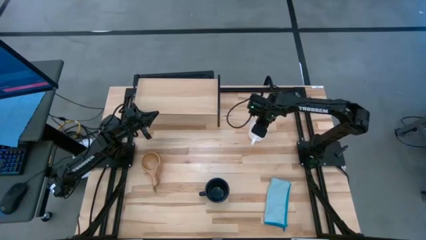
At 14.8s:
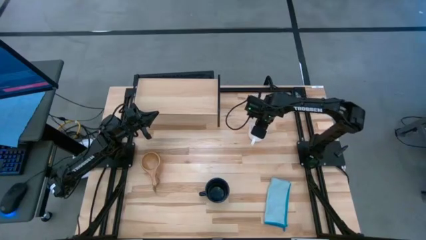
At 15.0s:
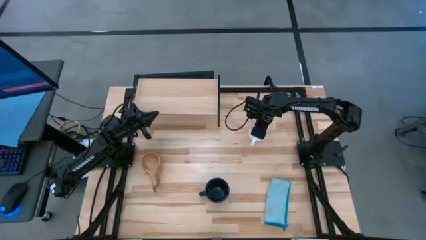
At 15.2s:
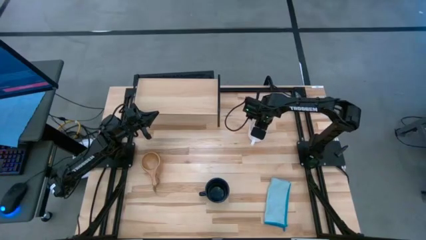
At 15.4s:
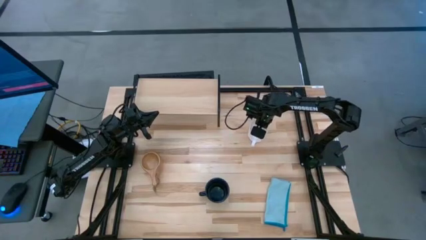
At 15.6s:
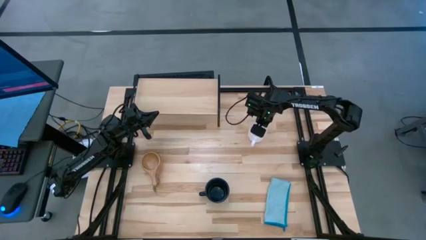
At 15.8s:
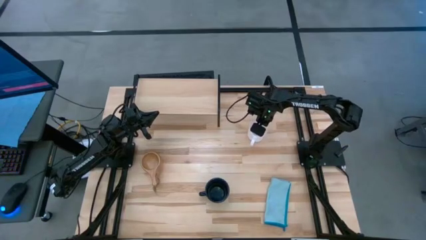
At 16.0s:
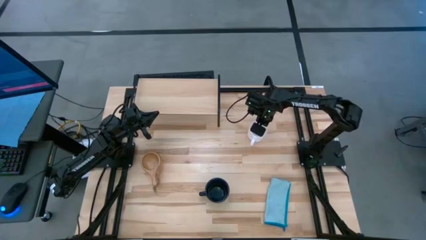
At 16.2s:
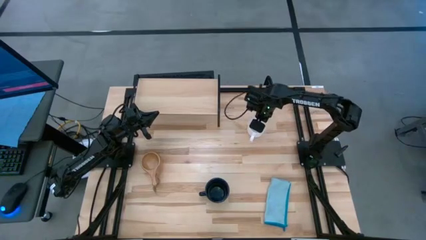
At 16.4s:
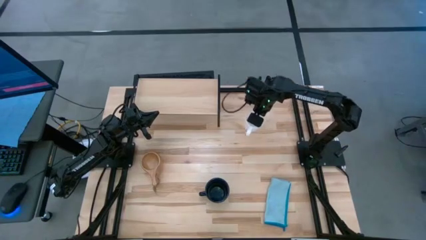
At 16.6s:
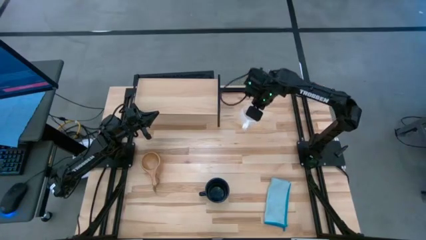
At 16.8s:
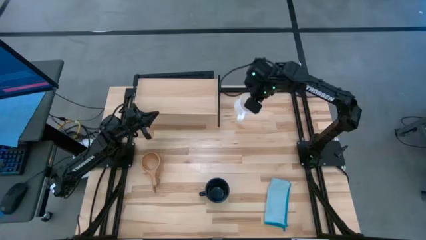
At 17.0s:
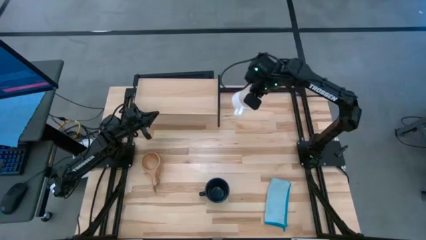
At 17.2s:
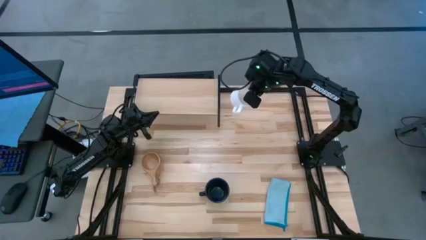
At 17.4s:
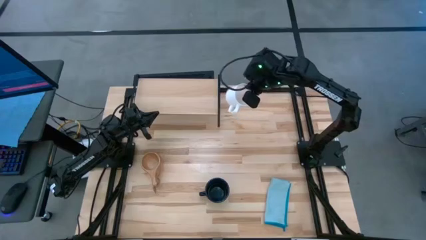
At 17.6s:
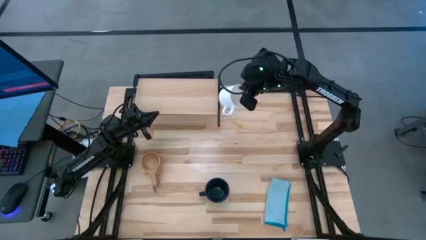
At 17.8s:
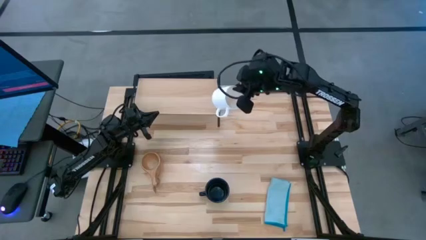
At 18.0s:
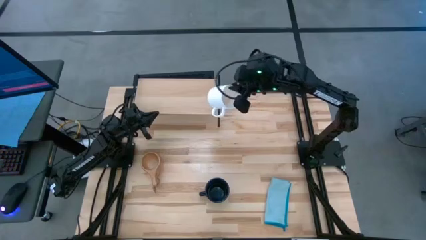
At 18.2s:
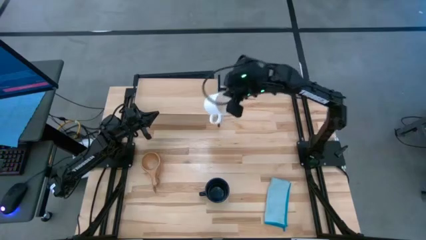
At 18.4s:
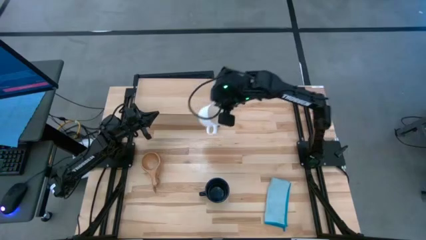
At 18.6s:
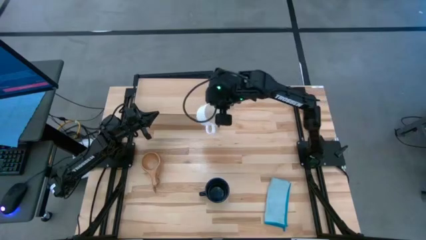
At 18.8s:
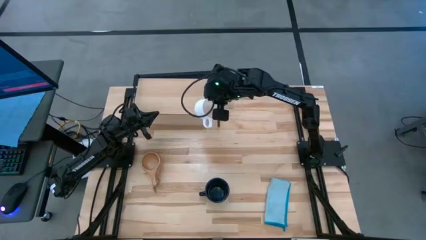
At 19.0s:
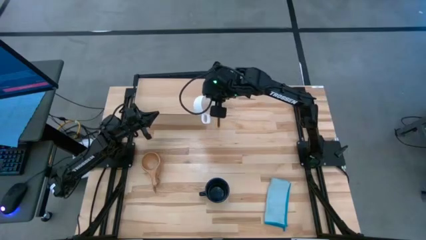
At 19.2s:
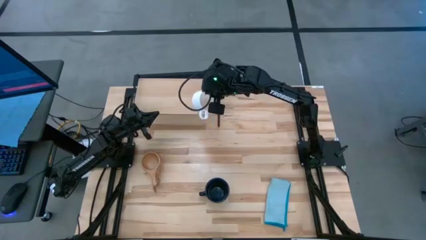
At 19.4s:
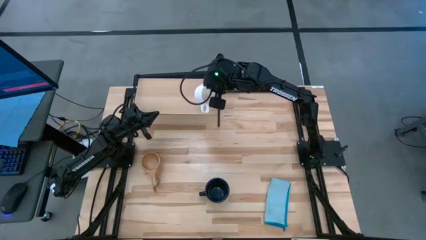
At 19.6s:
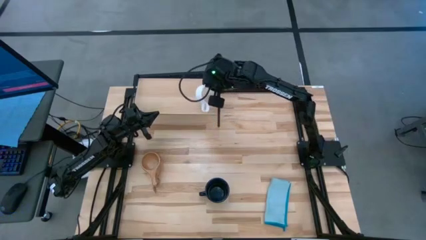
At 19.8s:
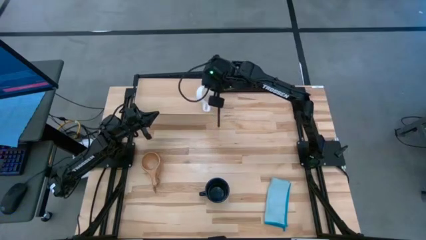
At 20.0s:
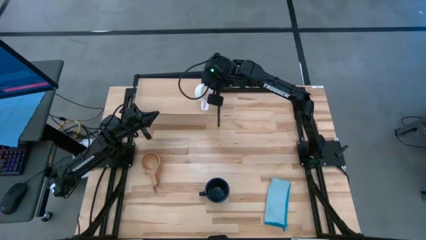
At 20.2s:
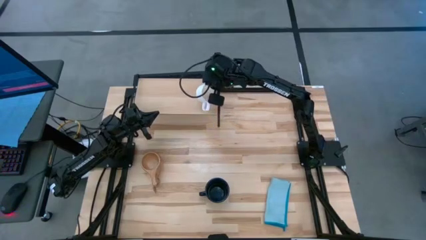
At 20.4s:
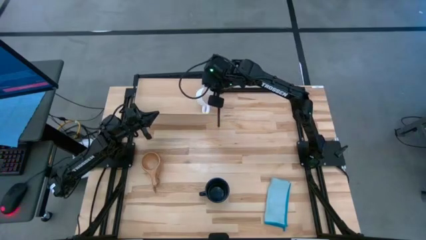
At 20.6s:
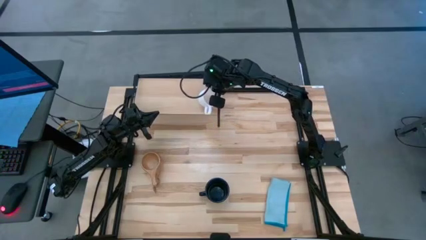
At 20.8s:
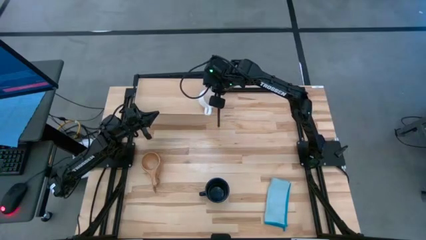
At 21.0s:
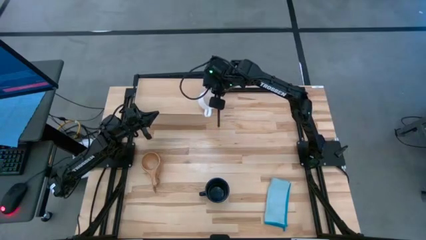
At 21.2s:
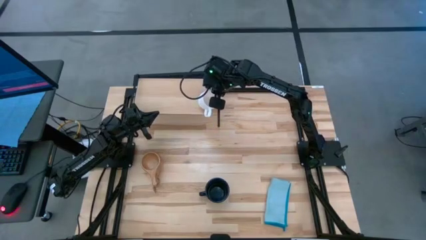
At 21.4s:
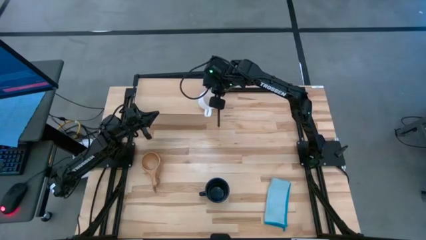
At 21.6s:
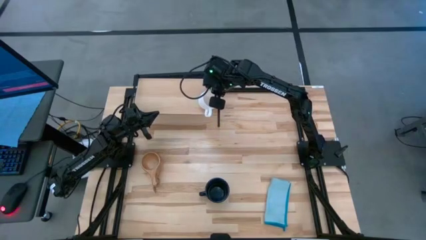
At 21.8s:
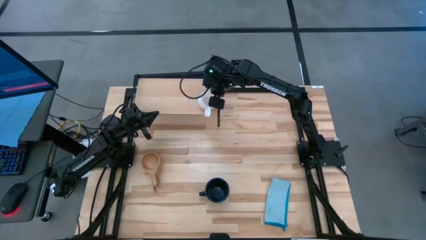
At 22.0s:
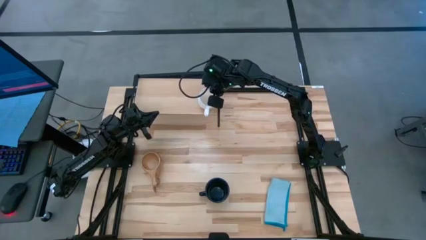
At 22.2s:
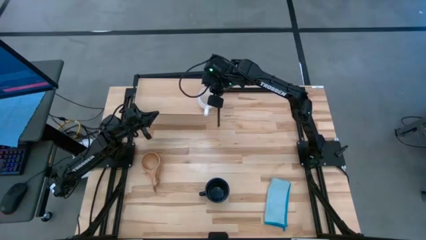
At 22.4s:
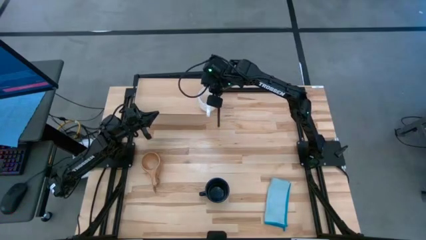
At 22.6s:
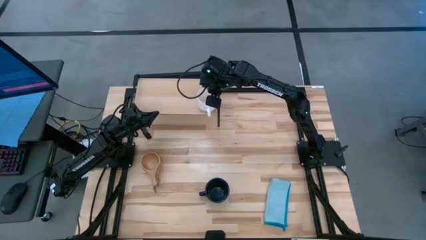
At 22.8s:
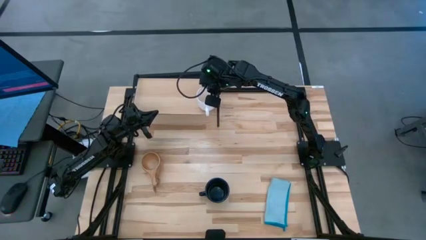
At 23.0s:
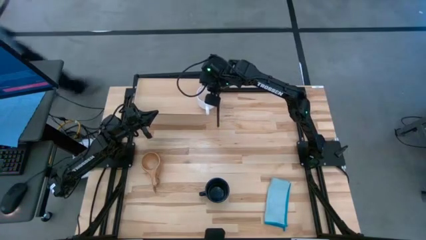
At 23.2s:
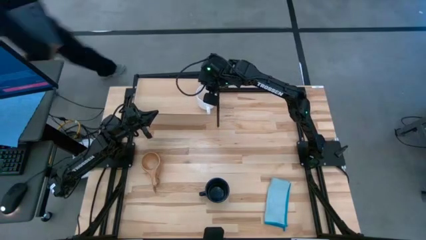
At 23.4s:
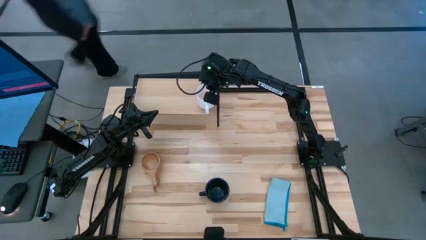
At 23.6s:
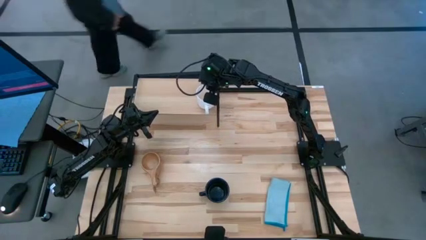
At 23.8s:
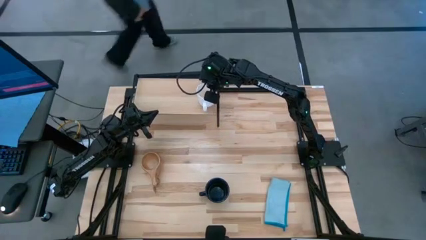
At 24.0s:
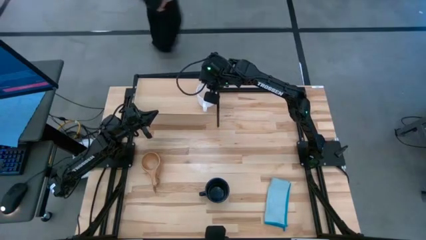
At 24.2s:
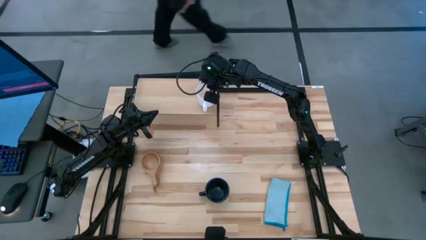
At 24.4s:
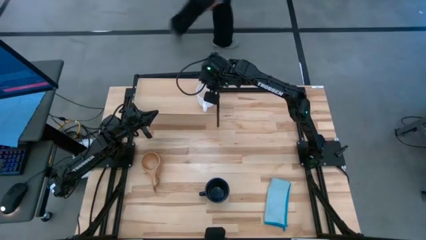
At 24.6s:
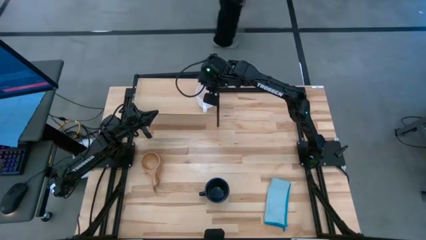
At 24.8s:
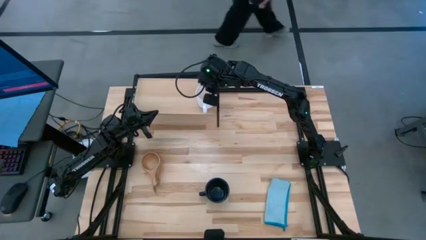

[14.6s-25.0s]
Task: Stack small to large cups/mugs on shelf
Put the white mug on the shelf

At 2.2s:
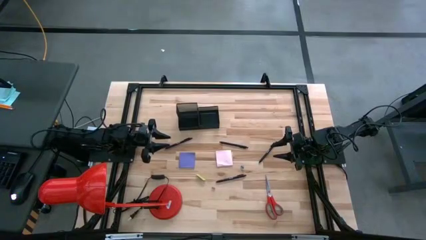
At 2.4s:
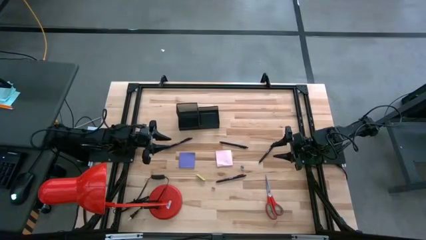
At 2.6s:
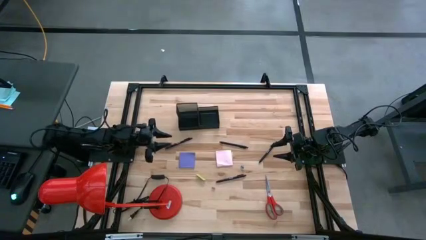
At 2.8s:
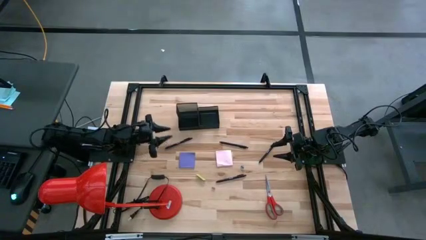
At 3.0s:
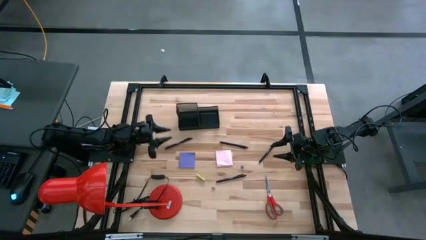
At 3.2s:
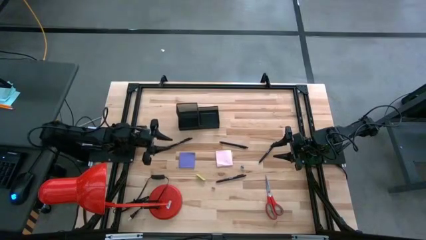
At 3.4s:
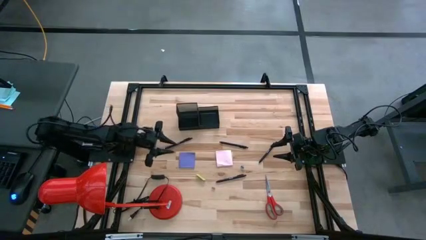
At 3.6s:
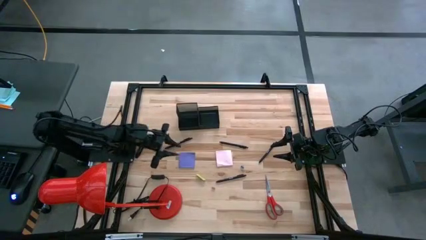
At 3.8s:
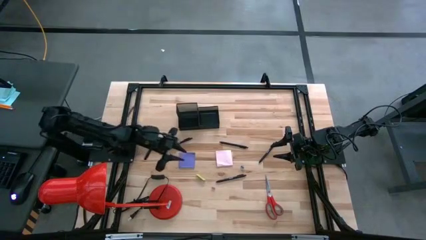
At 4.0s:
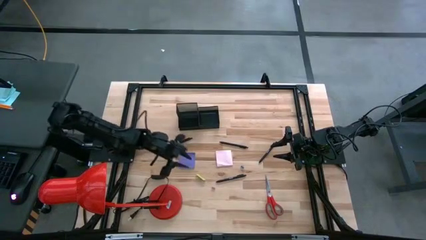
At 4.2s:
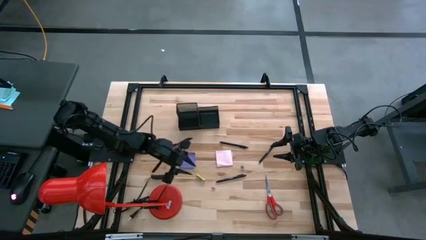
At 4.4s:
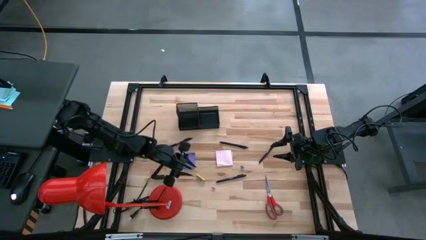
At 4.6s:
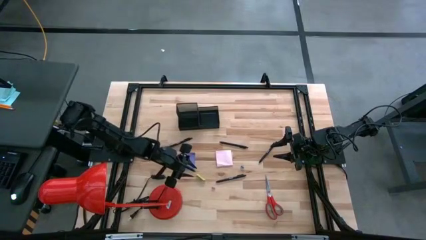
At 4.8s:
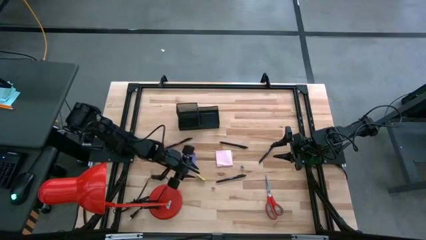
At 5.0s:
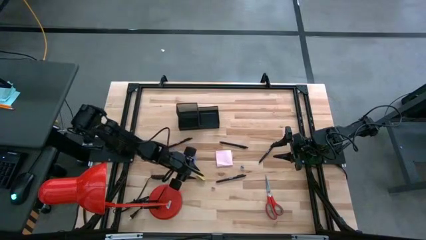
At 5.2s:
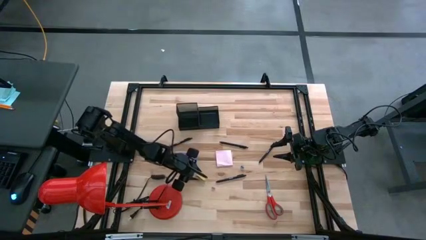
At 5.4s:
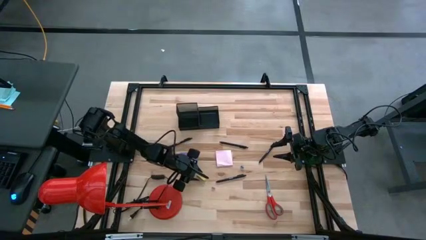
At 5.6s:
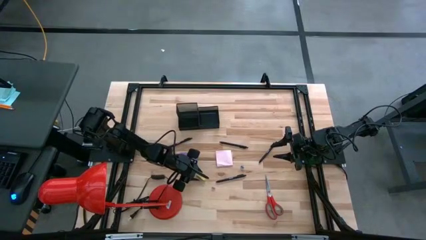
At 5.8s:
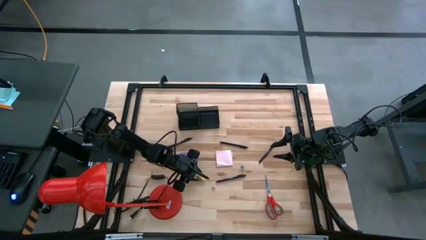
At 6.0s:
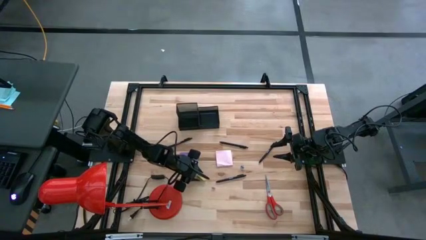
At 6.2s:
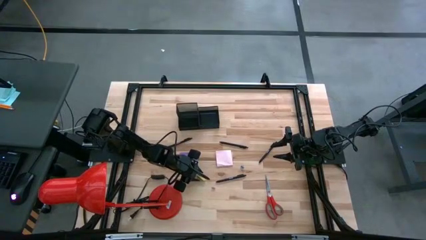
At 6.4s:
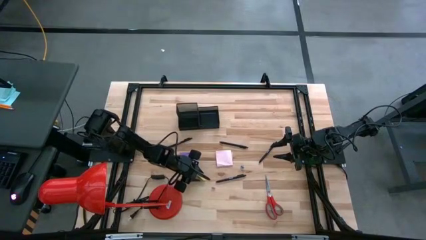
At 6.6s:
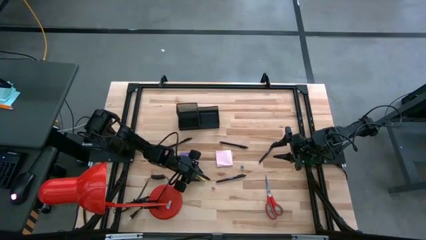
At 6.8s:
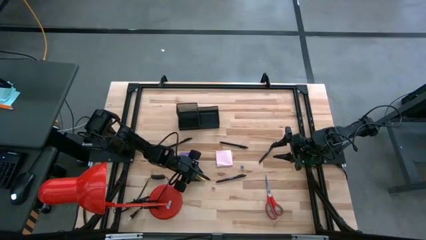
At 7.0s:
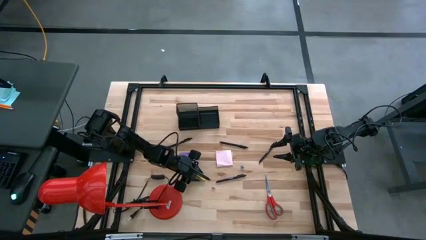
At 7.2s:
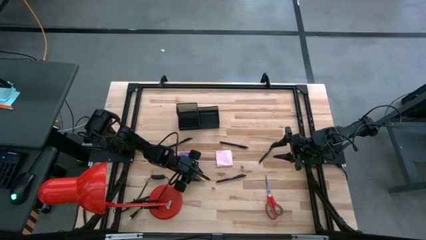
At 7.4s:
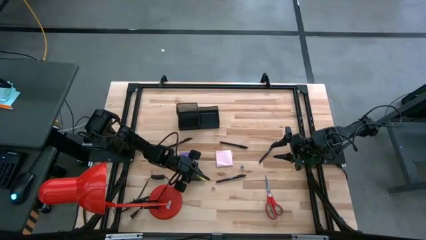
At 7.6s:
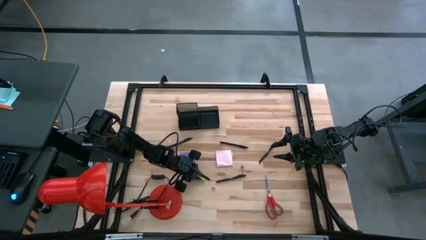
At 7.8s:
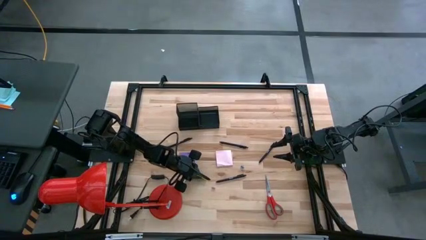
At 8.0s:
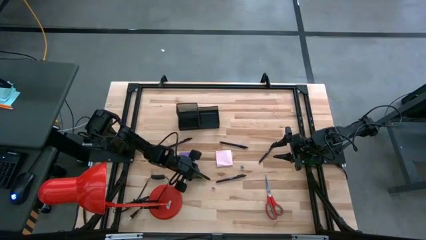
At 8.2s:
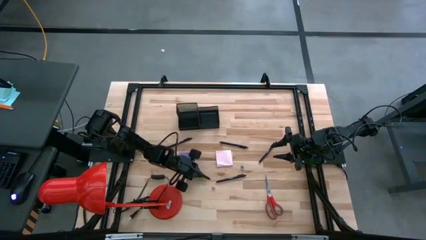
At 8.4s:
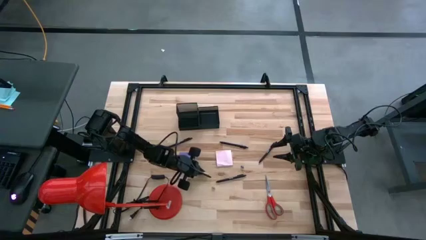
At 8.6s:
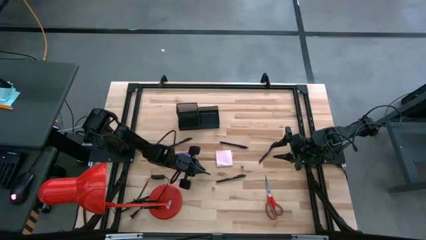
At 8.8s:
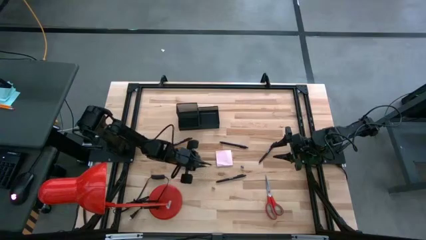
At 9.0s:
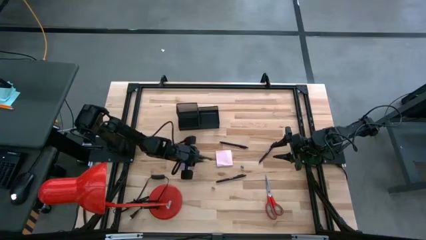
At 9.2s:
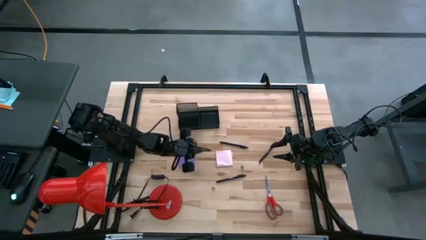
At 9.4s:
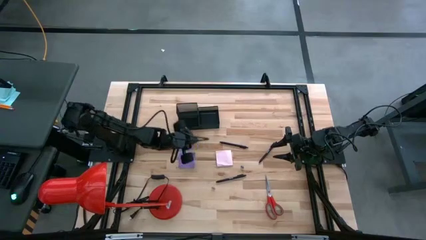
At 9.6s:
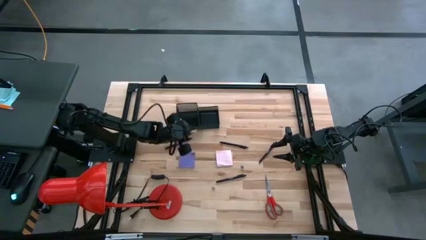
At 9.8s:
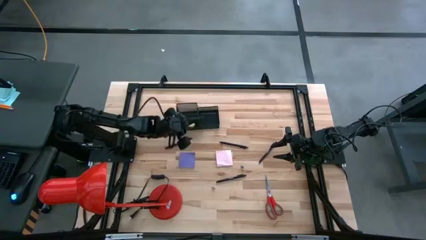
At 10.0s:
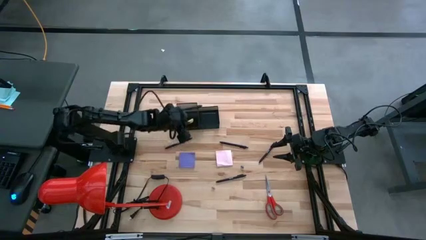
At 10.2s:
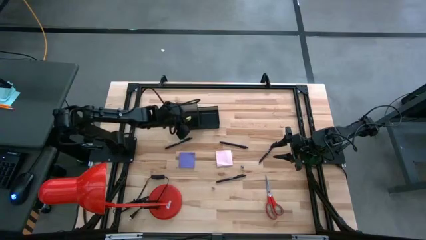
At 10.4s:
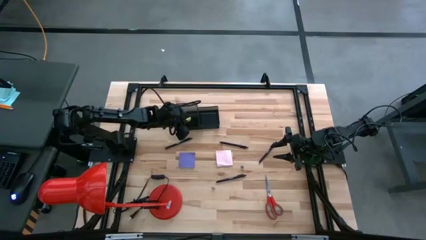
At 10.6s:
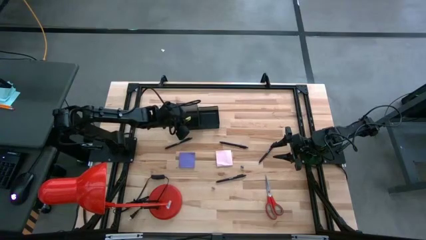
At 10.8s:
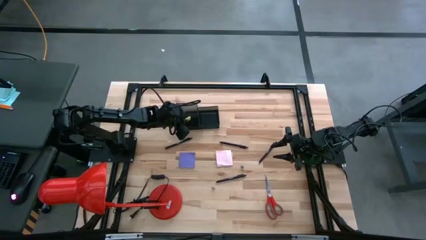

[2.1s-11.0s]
Task: Pick and place office supplies into organizer
Put the green eraser into the desk organizer
